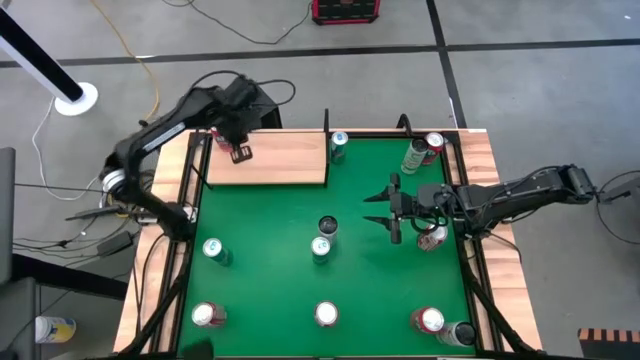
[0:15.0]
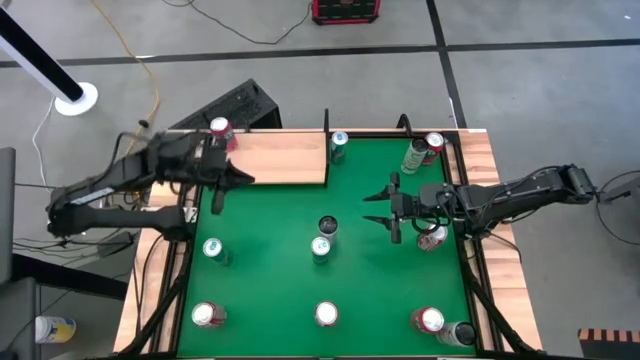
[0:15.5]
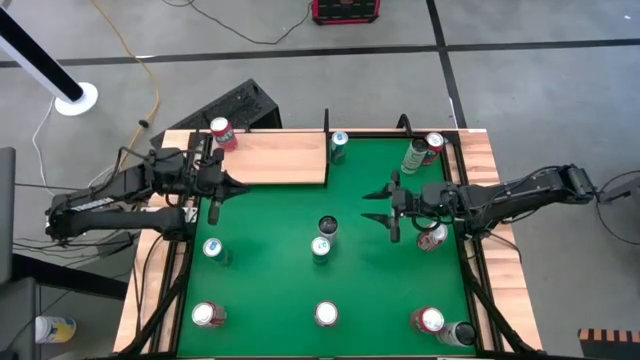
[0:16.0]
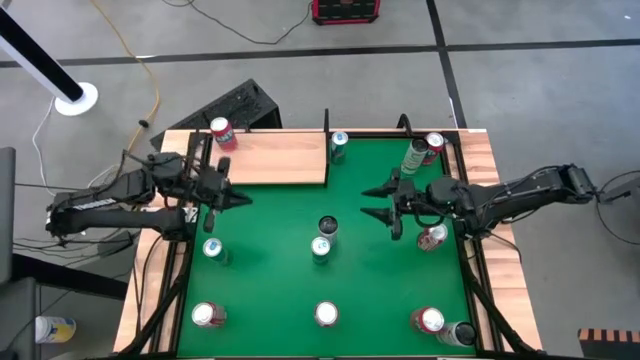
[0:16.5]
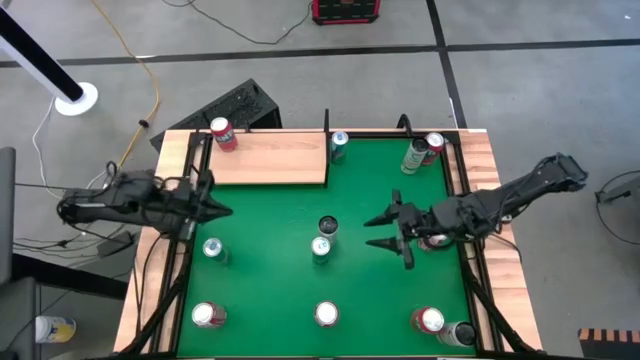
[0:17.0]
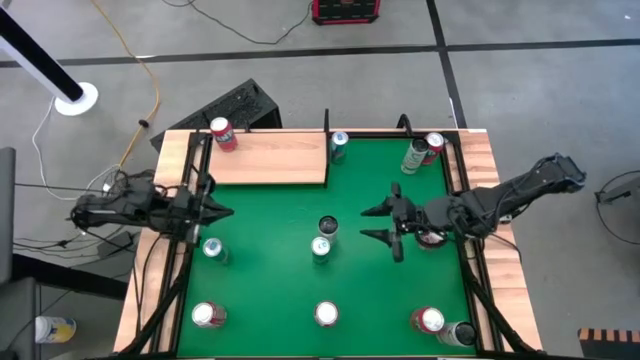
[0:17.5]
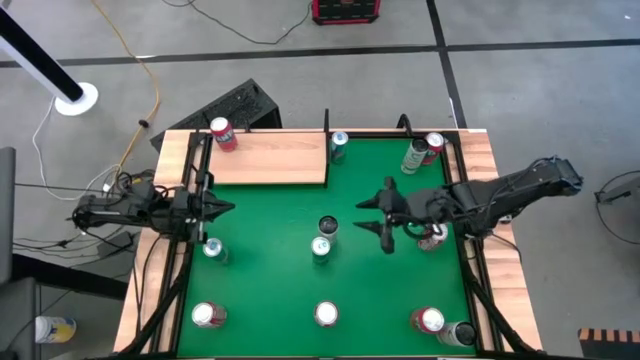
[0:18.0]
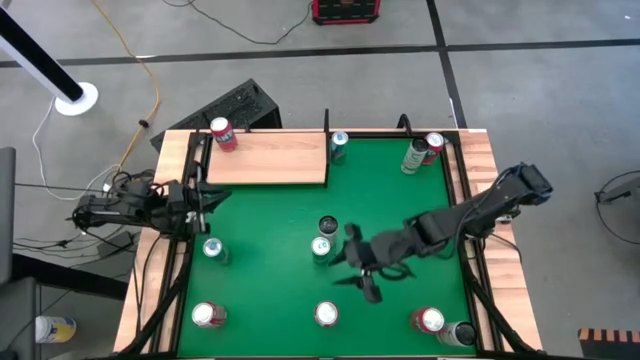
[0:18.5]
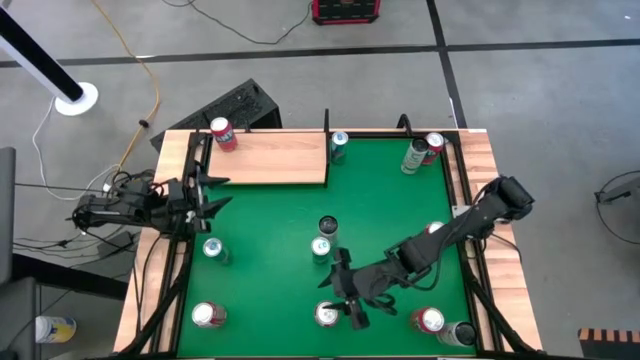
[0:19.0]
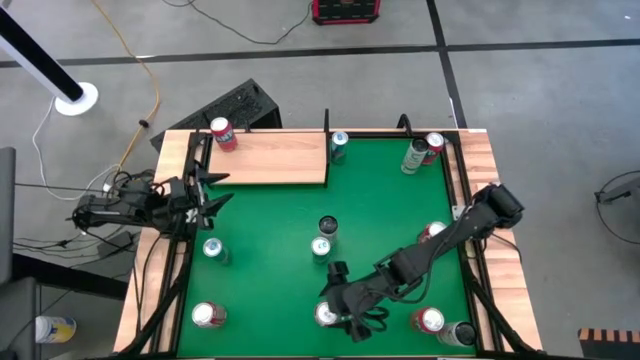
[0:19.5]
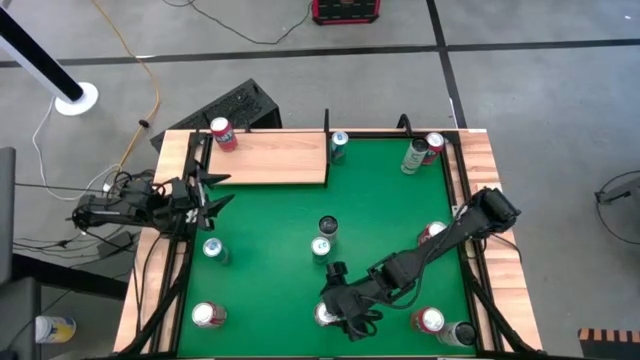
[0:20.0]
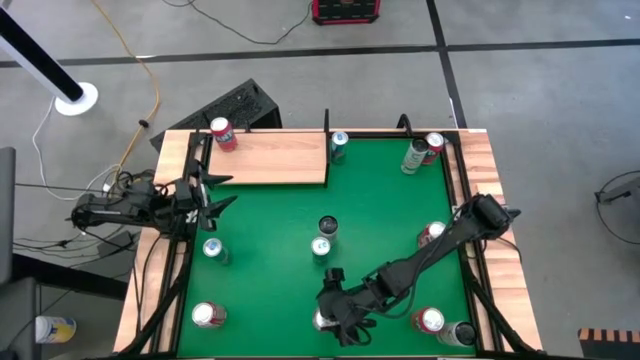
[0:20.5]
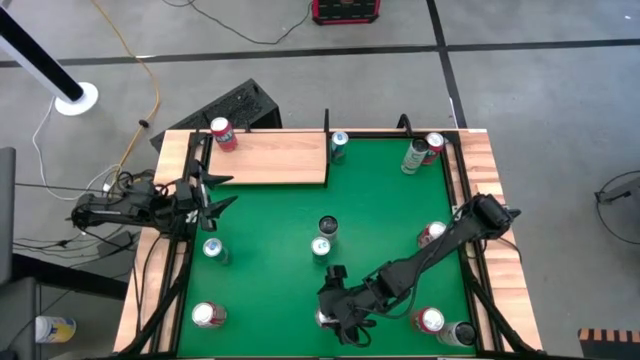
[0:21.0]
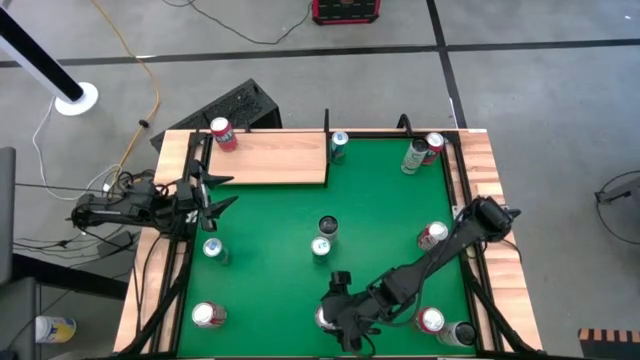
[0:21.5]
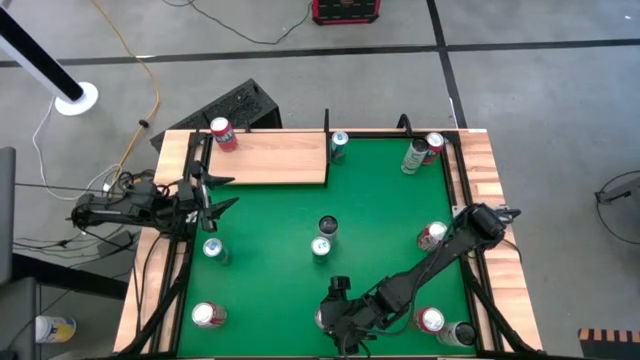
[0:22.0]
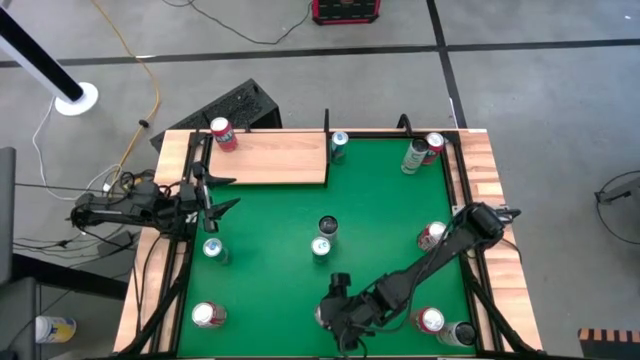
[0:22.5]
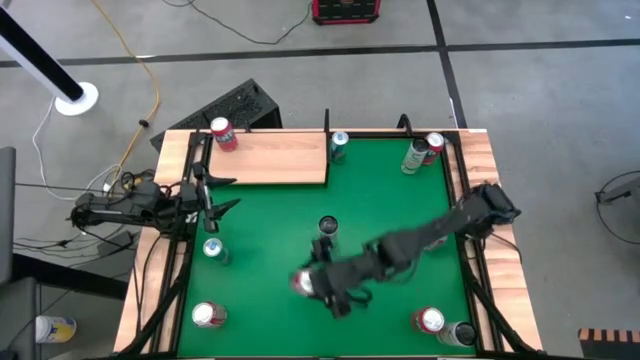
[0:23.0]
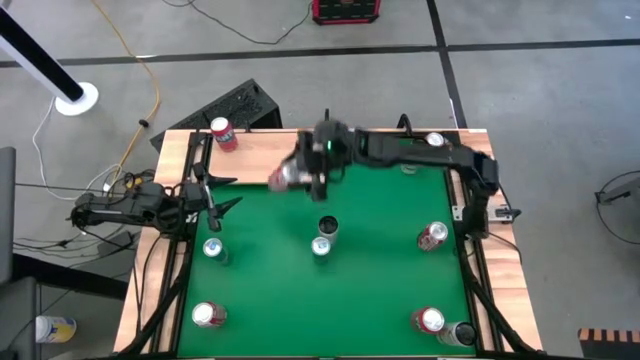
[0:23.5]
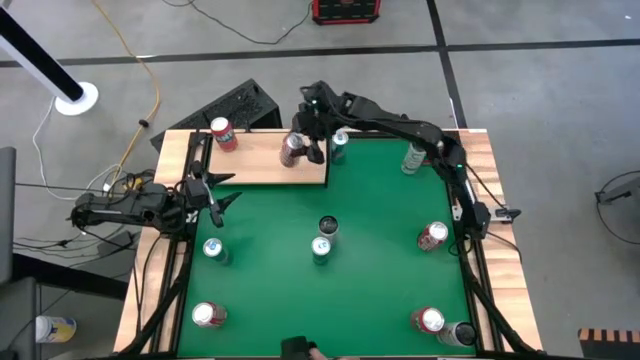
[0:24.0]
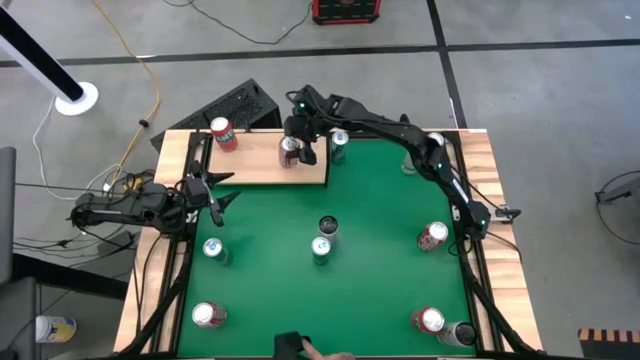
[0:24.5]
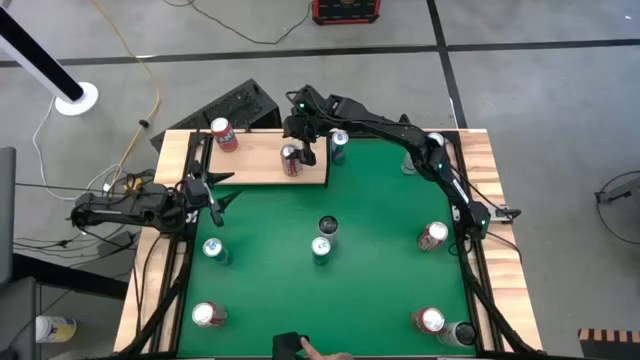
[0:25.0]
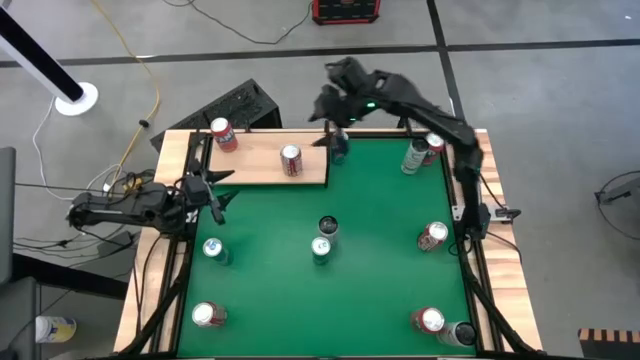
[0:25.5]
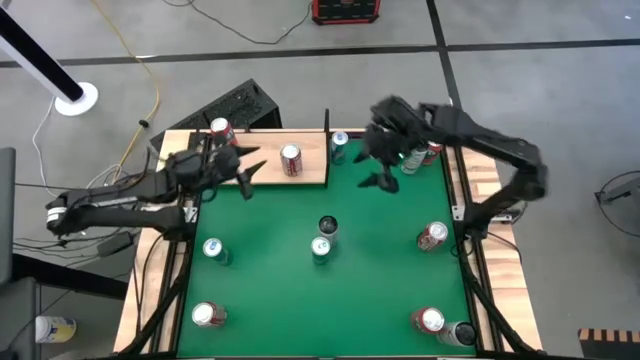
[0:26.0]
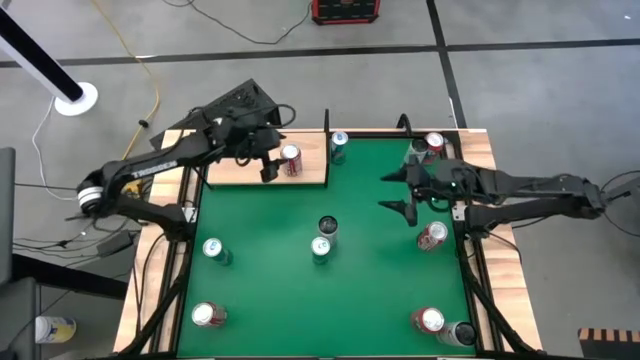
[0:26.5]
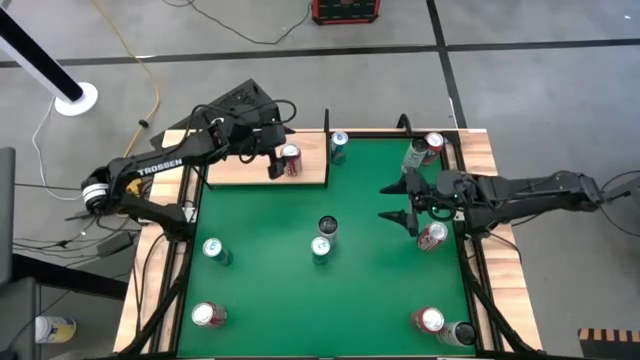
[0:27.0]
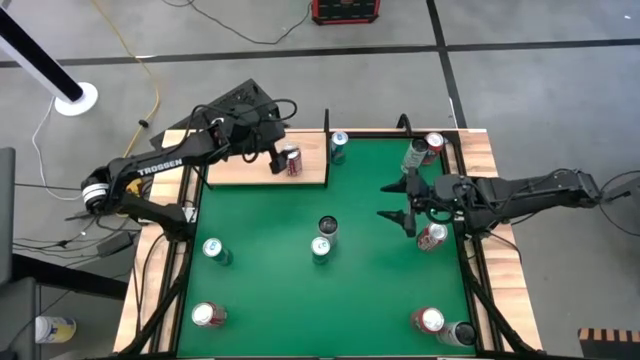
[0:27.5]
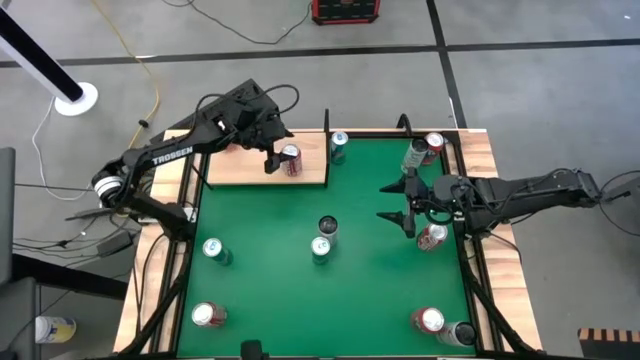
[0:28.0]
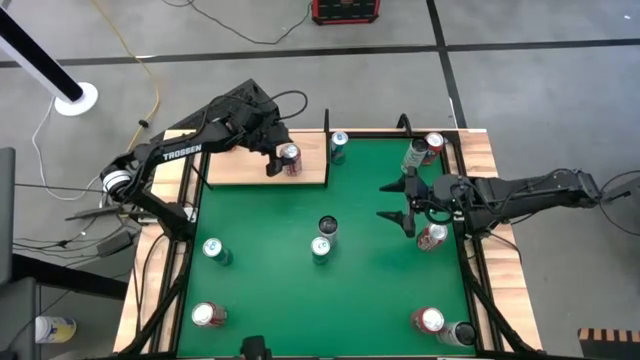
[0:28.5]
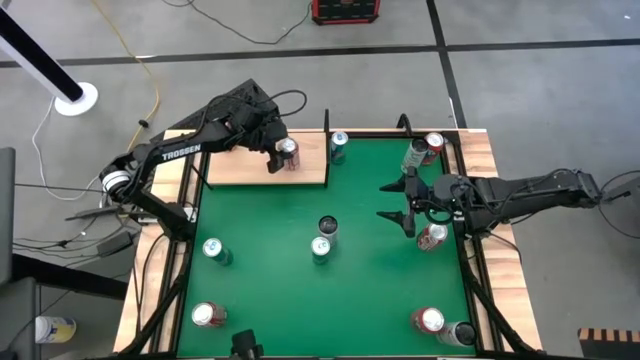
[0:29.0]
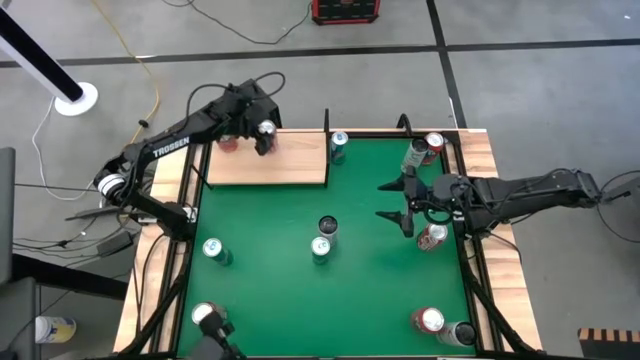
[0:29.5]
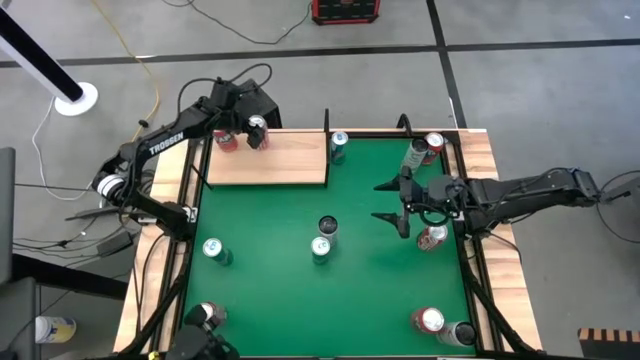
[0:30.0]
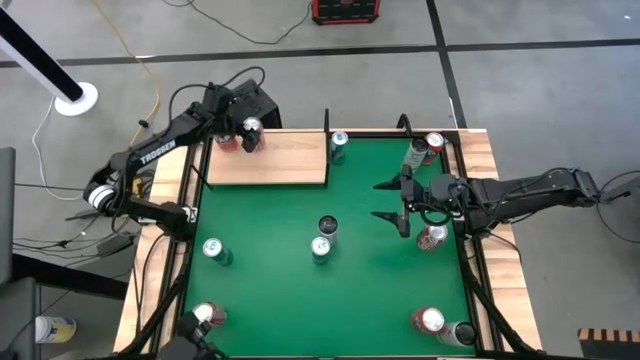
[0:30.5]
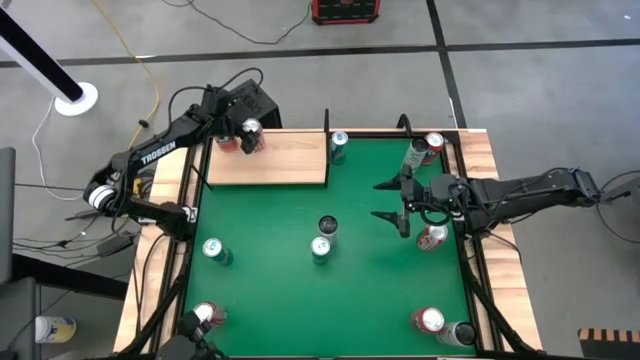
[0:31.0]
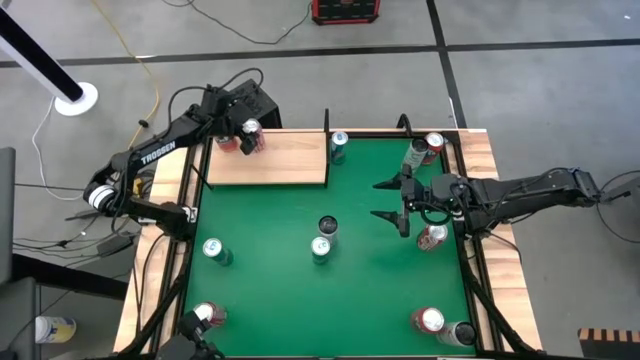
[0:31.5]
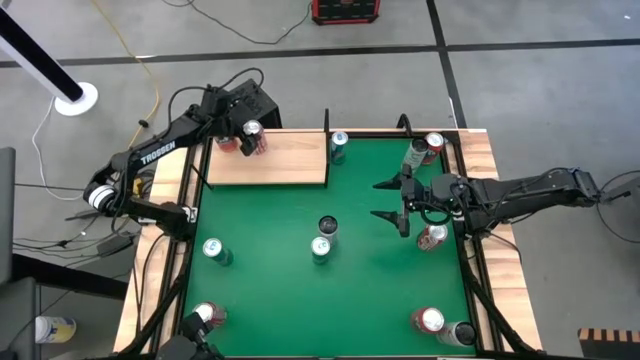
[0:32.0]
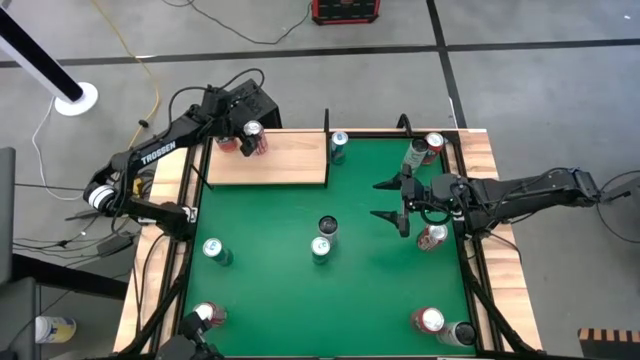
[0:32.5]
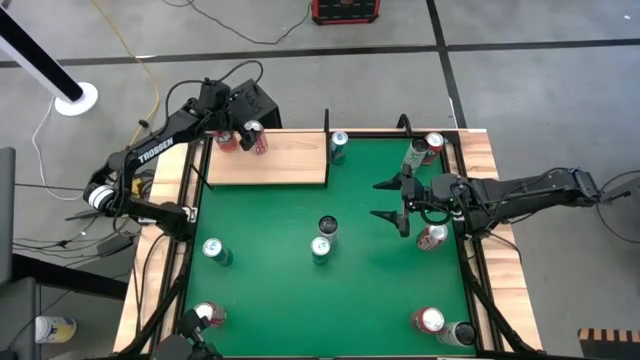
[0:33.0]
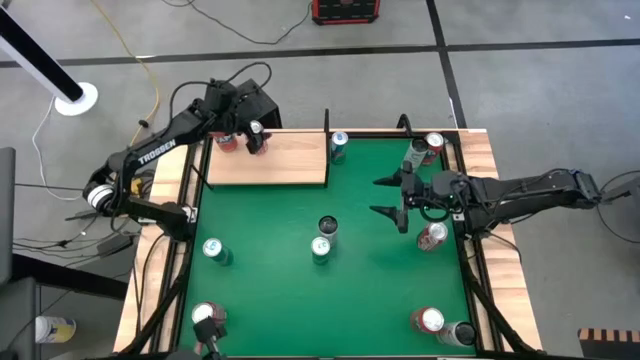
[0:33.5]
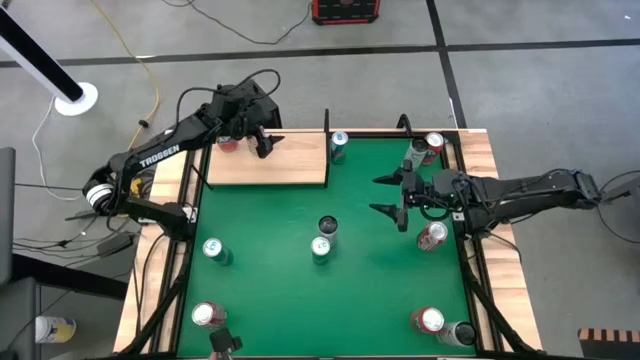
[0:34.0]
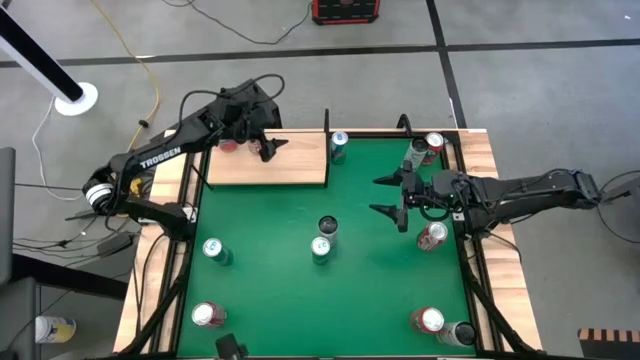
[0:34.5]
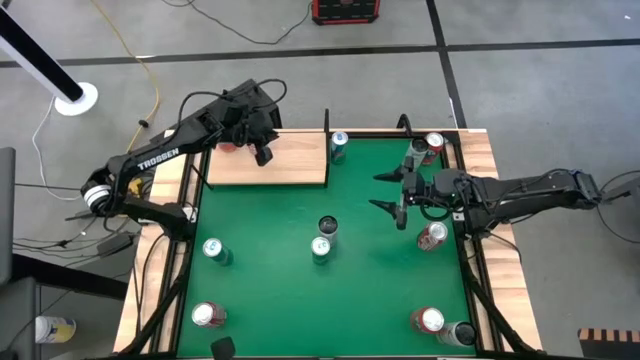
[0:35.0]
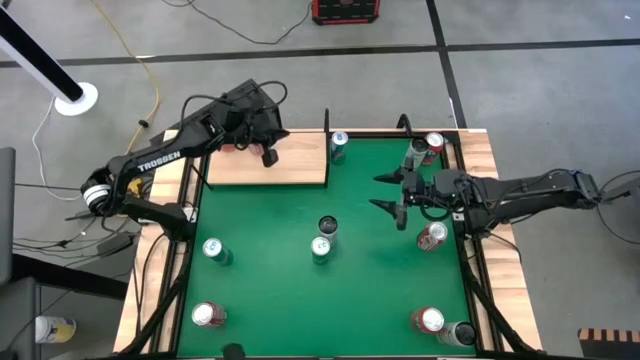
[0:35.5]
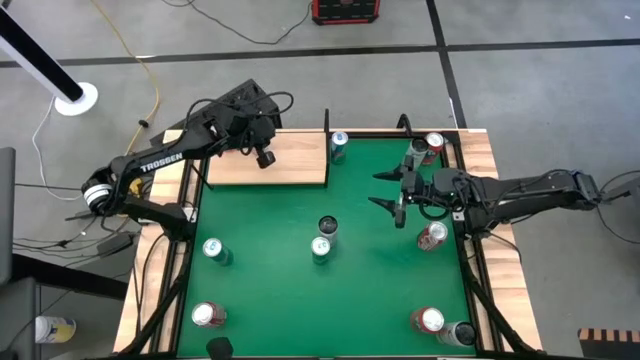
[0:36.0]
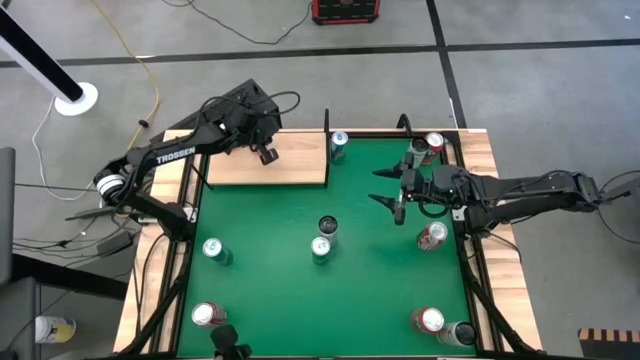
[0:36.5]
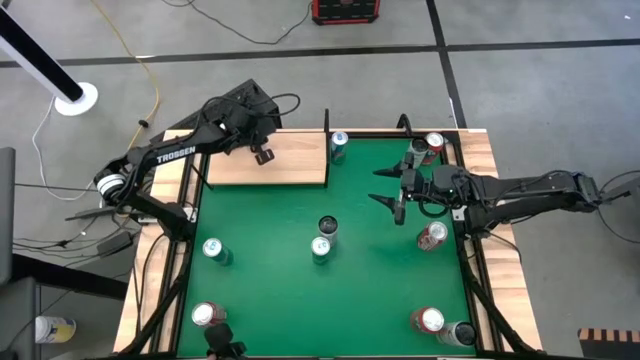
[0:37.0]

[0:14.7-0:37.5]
Task: Place canned beverage on shelf
Put the bottom right red and white soda can on the shelf
